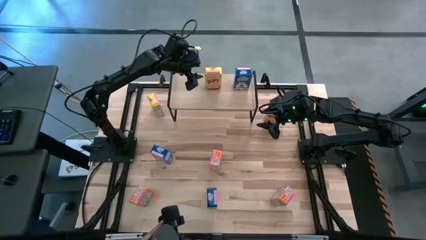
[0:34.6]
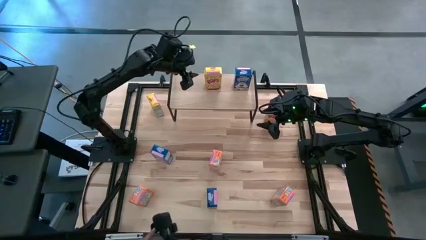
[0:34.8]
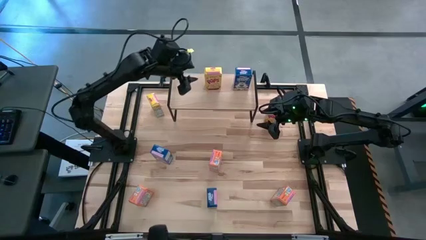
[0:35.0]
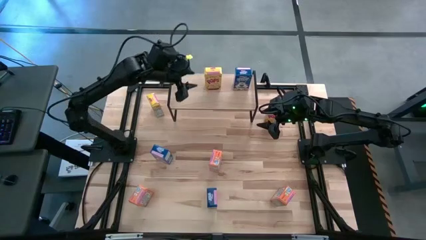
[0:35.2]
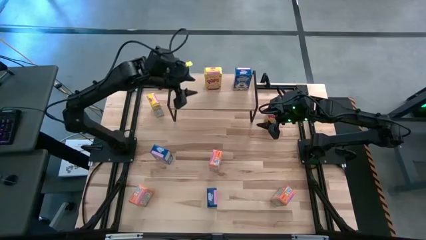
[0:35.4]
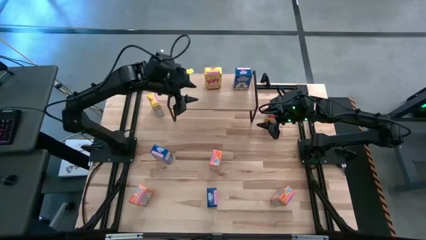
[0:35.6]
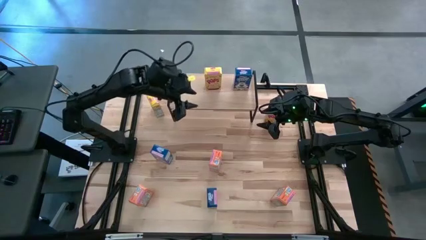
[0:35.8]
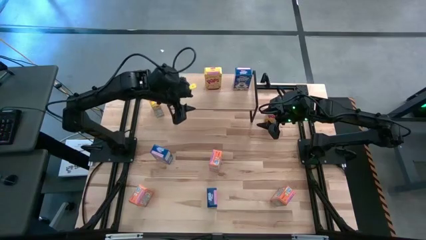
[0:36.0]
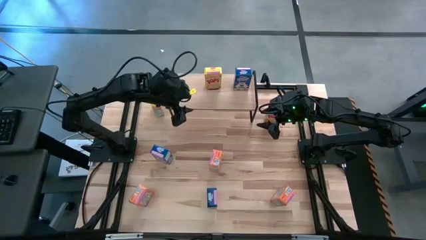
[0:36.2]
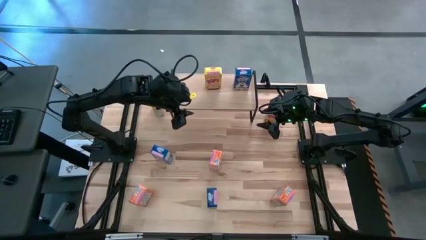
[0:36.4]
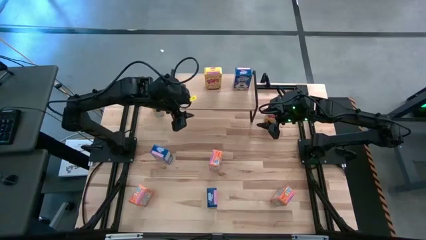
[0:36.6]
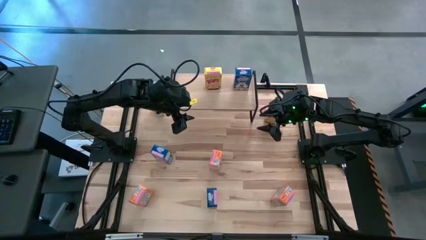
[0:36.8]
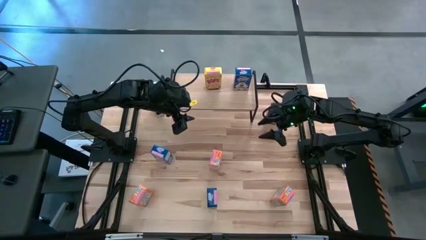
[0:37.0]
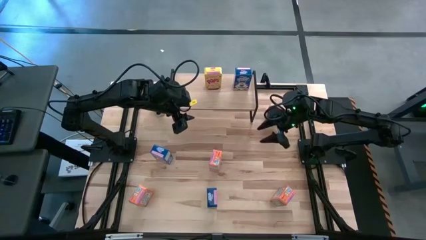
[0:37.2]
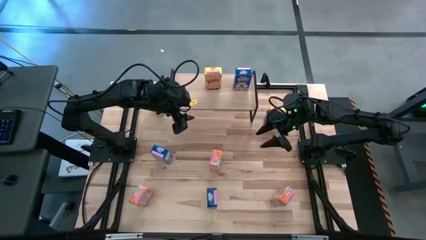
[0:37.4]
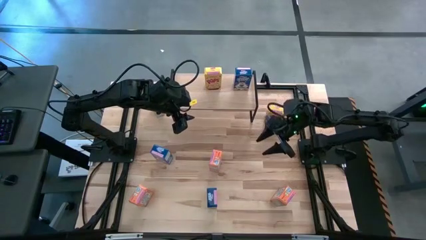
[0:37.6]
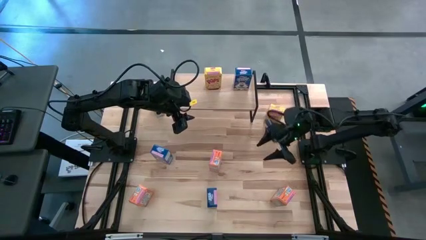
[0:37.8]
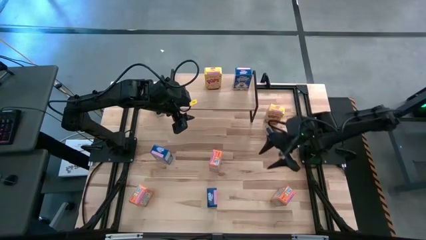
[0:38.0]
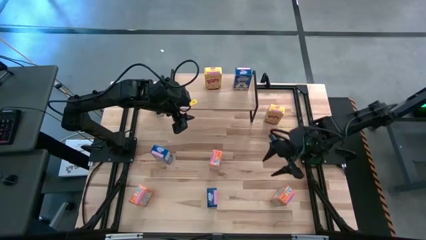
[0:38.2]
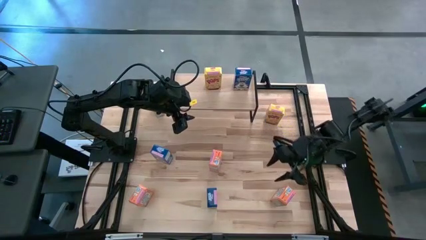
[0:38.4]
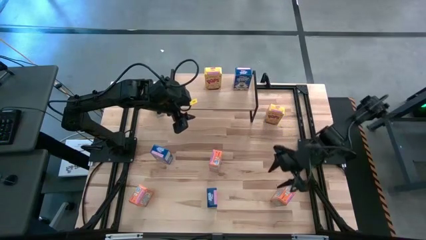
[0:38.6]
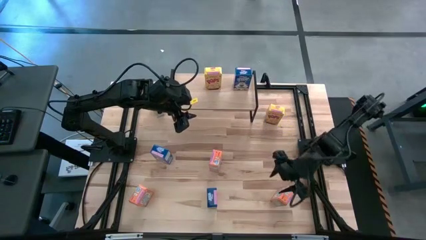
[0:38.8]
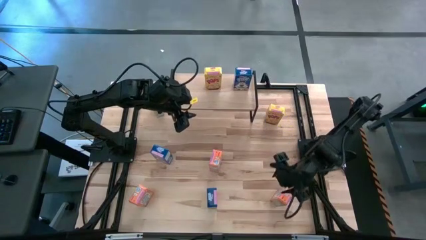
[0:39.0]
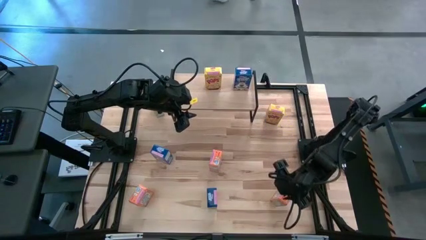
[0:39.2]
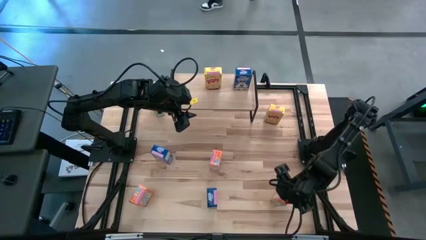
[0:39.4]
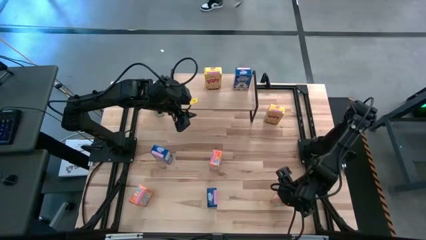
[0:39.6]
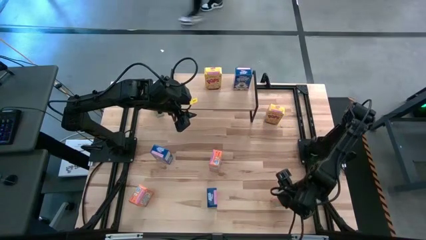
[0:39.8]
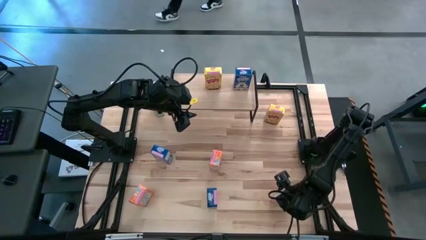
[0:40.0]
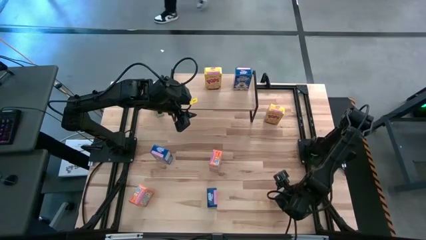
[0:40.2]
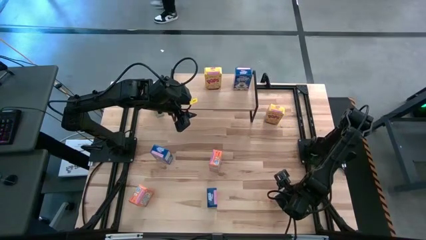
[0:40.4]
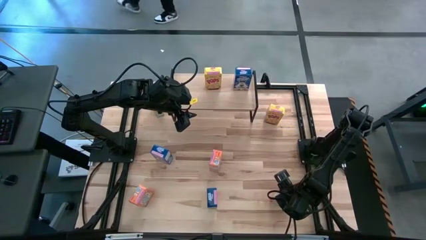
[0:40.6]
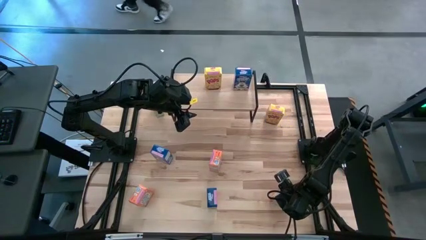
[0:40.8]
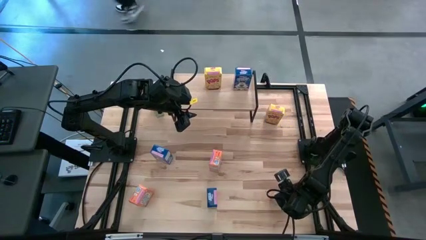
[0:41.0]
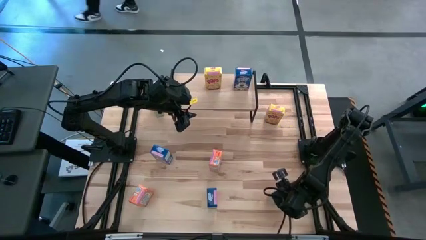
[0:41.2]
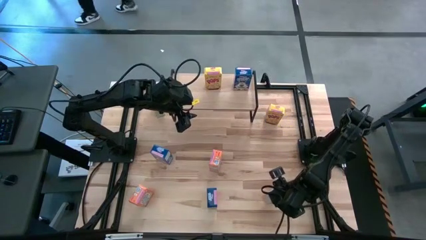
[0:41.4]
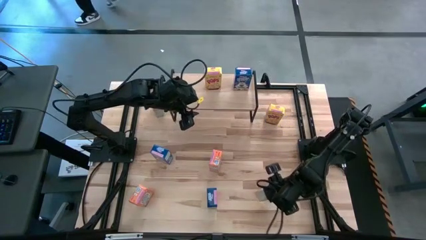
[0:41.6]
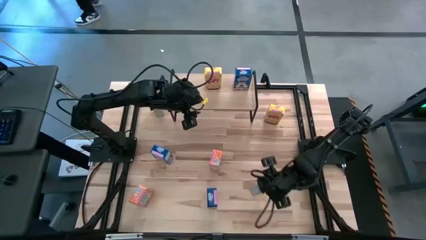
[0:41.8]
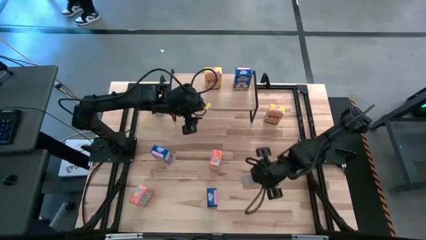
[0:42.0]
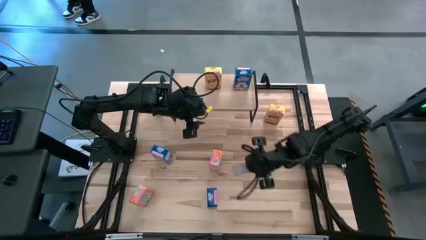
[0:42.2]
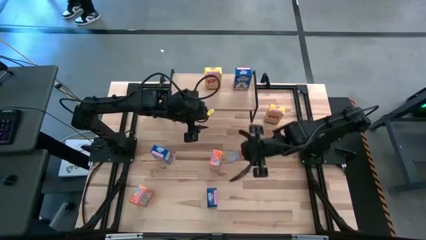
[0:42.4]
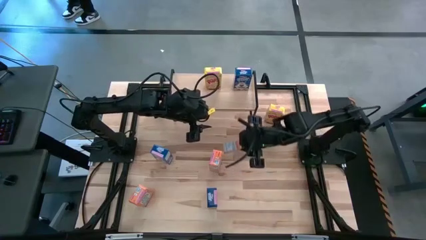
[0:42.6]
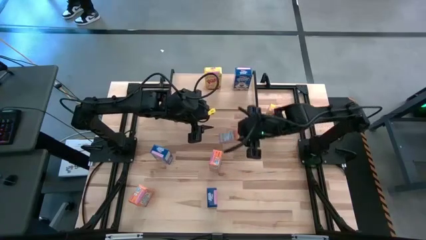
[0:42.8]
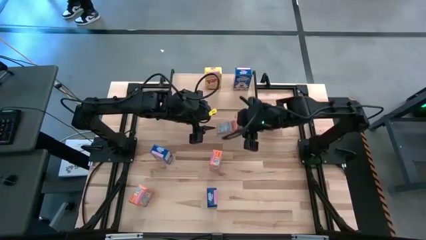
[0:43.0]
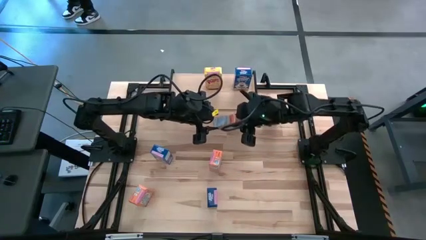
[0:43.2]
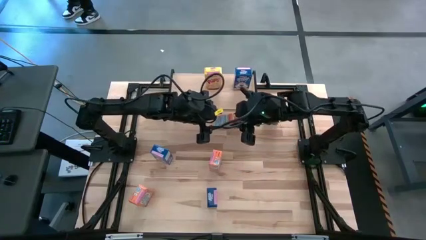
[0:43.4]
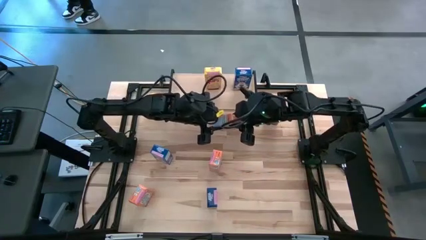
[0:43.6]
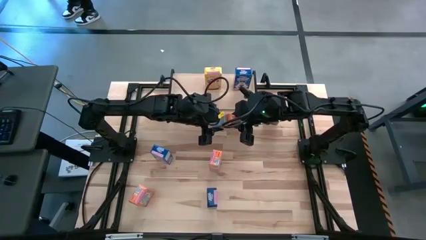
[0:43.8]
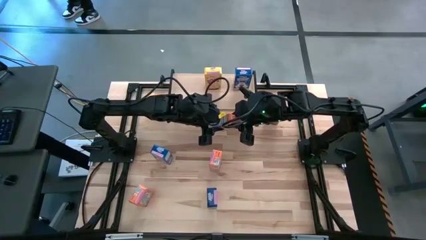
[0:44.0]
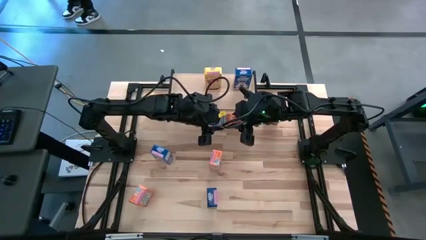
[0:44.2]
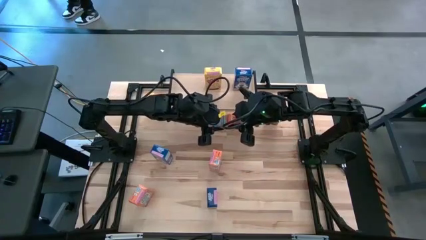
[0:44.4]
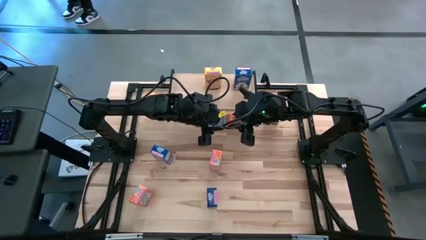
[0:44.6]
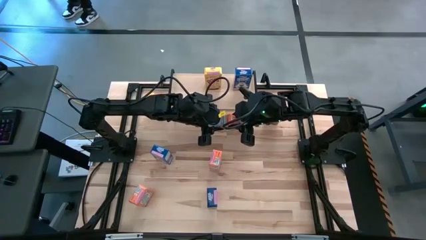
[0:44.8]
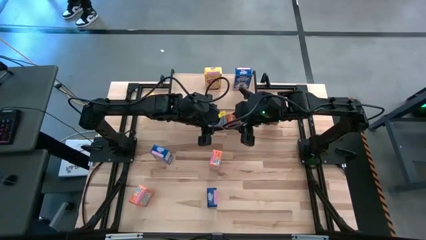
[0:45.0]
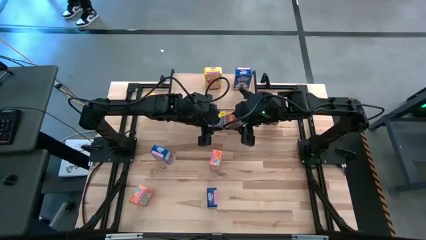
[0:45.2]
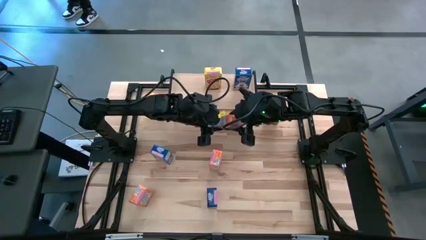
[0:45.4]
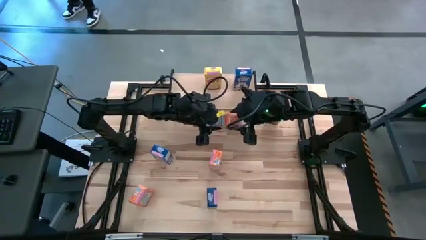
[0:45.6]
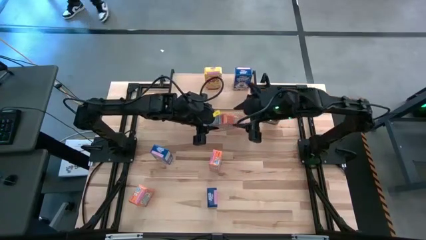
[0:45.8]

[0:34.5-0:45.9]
Task: Stack cereal on shelf
Put the bottom right orange cereal box on the shelf
